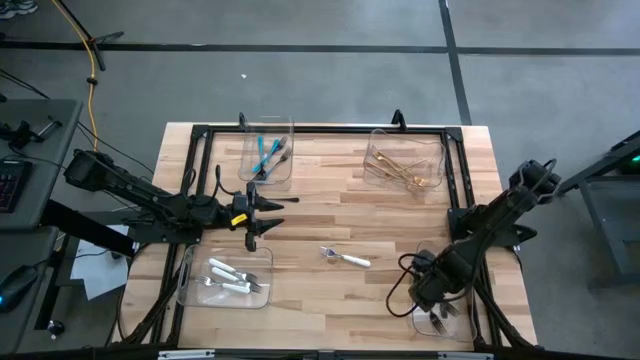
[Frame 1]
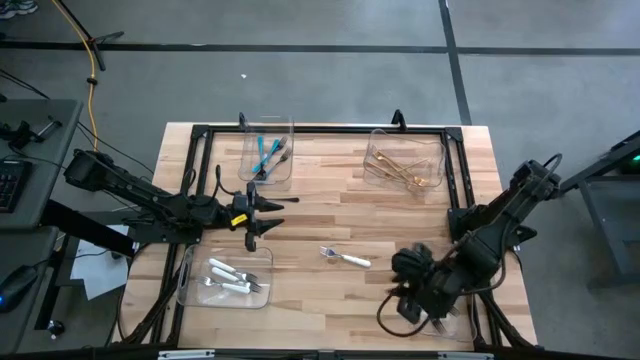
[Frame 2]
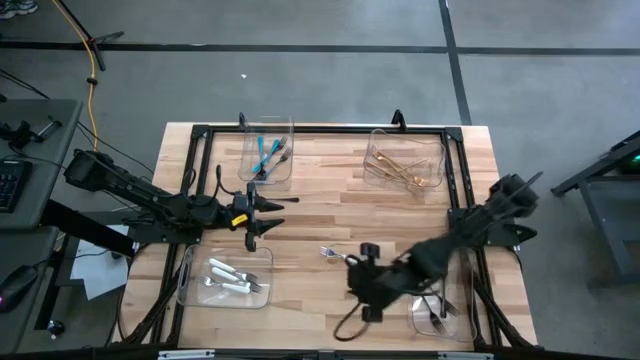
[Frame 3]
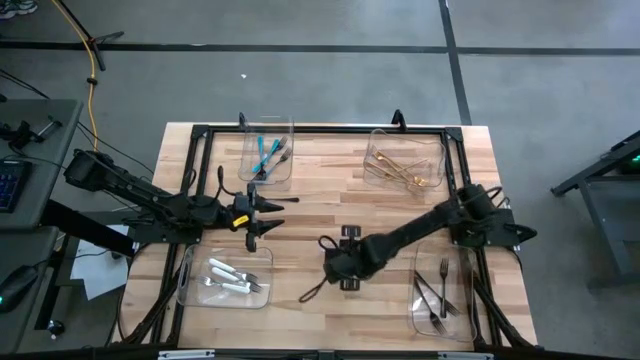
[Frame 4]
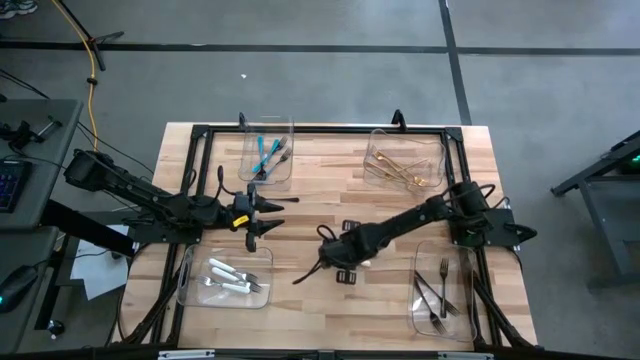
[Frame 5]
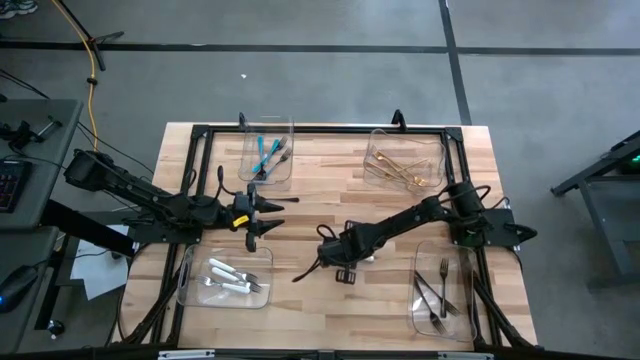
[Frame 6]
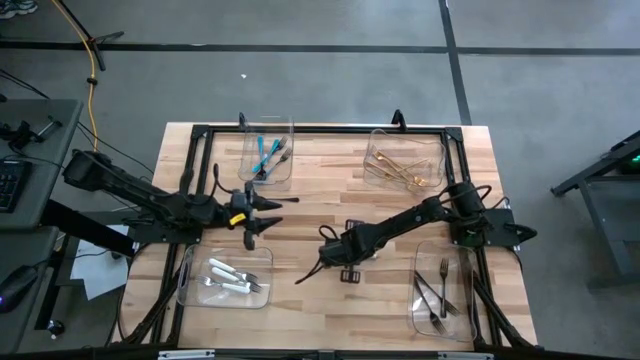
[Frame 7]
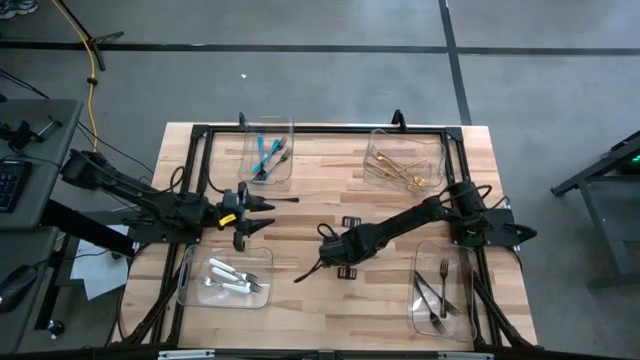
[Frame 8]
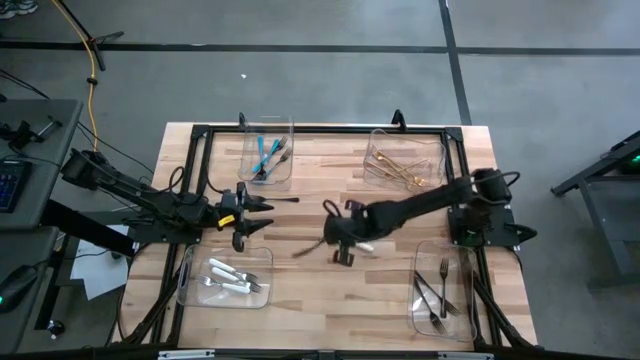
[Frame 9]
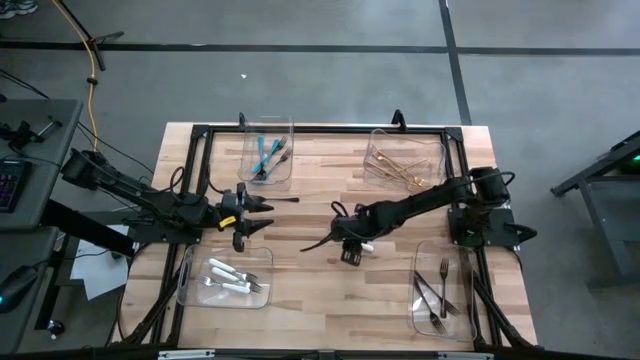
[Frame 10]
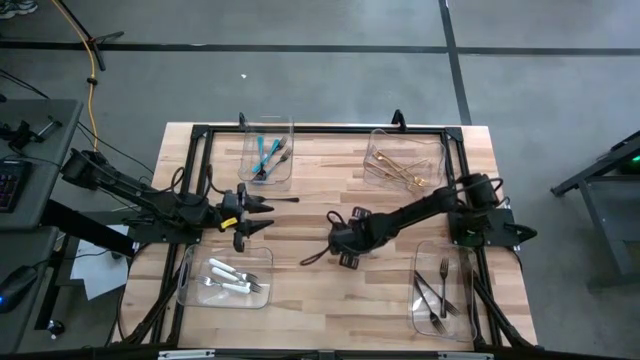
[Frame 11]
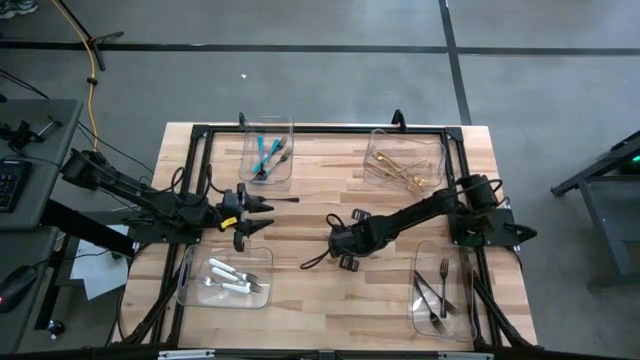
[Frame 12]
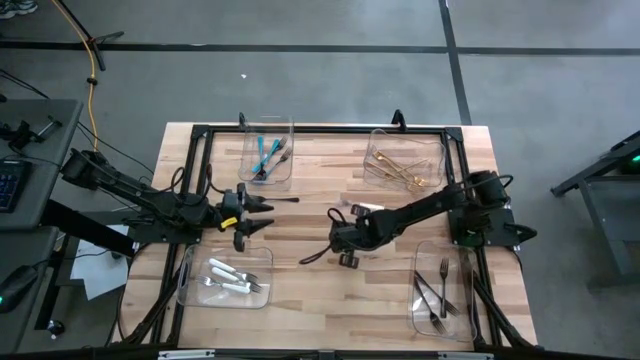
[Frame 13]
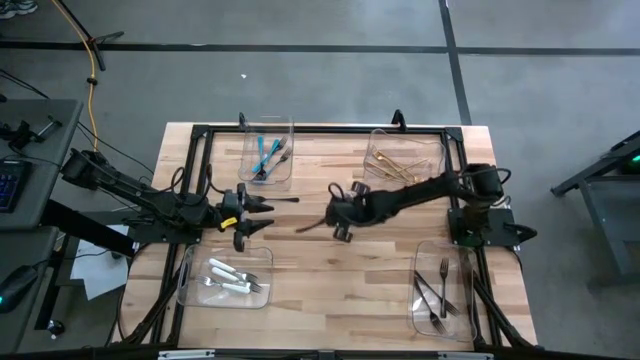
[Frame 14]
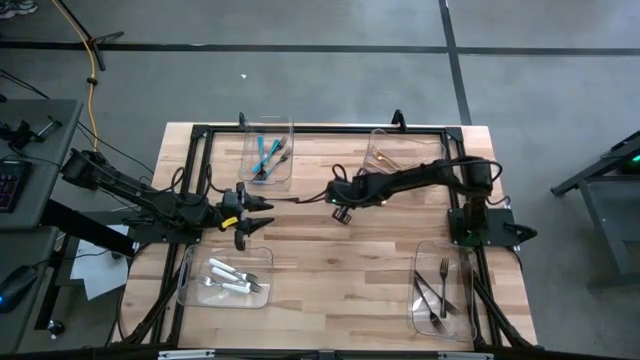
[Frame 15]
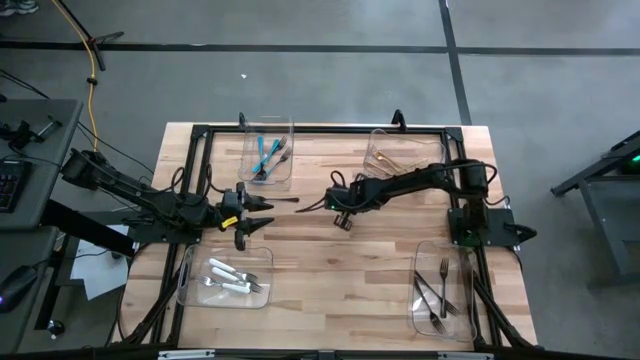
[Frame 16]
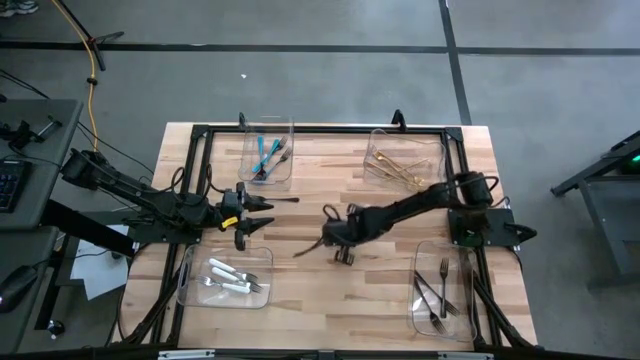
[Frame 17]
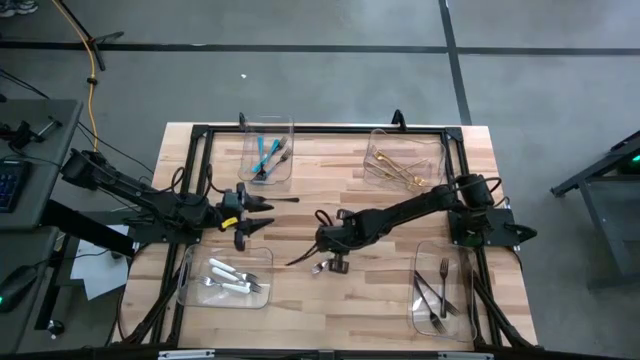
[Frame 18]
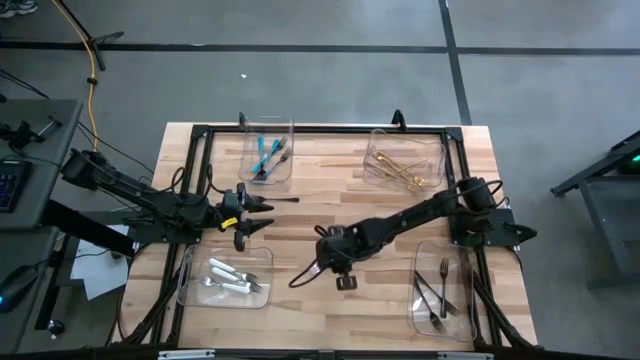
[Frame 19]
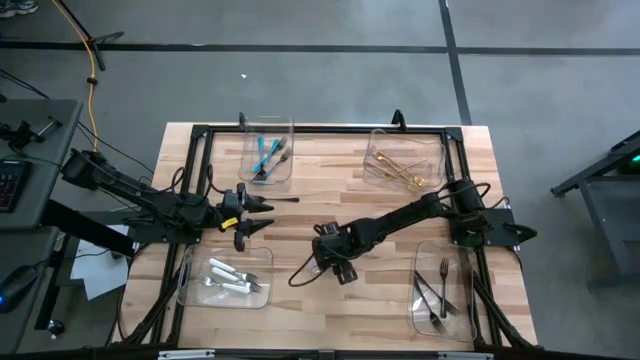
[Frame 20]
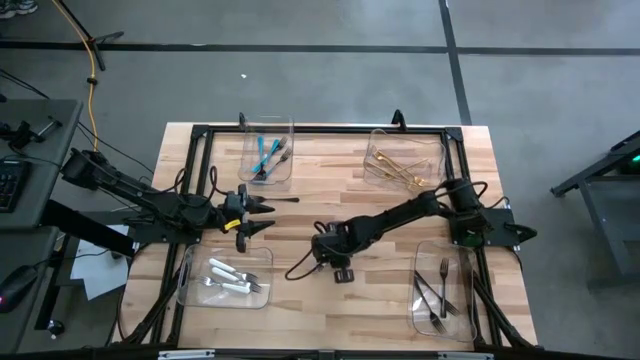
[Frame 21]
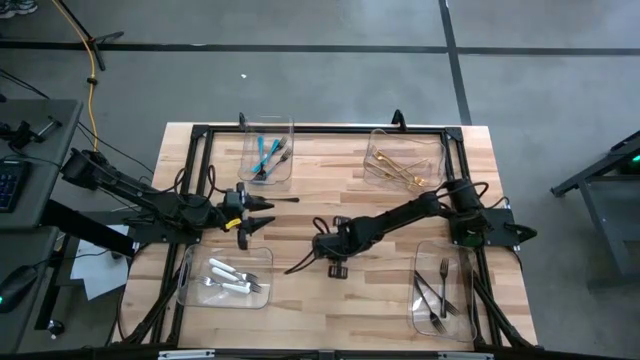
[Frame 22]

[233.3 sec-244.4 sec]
Task: Sort silverware by color (type)
Put the white fork into the bottom left transparent bin

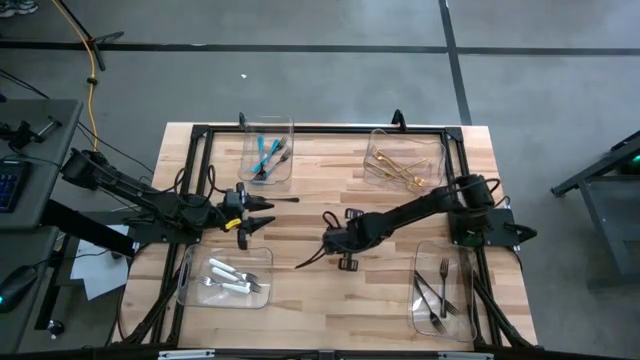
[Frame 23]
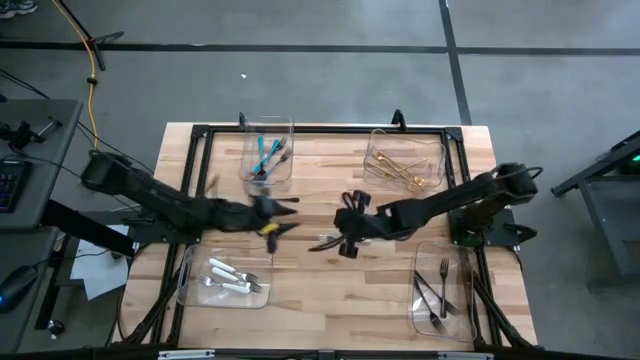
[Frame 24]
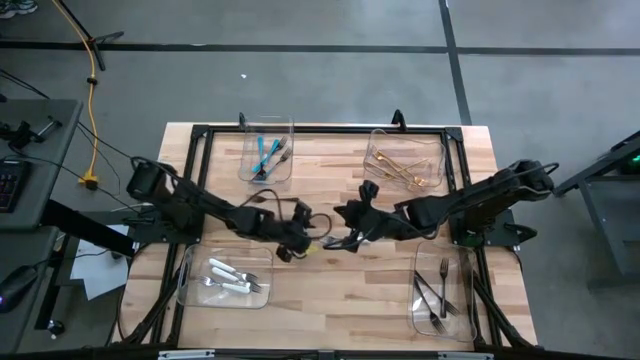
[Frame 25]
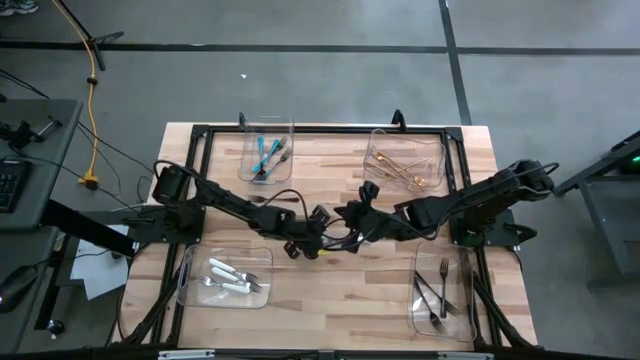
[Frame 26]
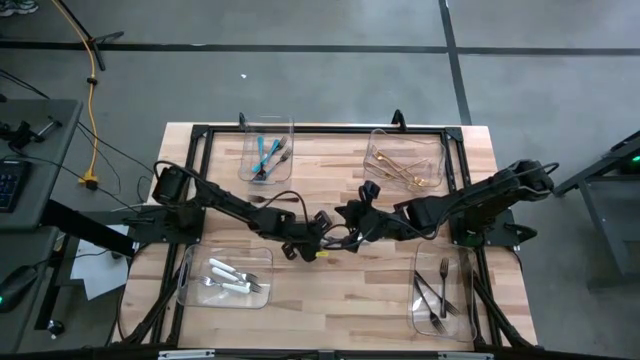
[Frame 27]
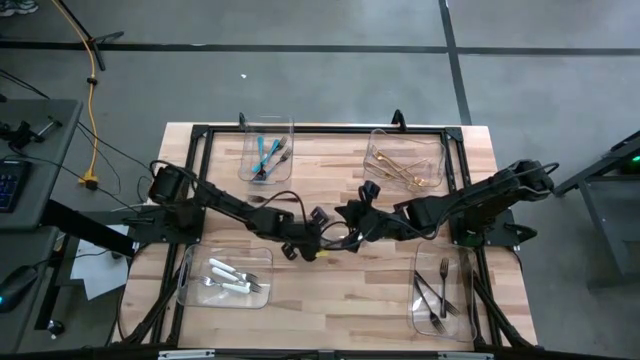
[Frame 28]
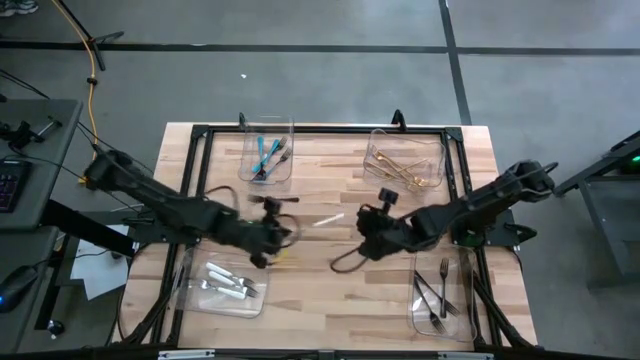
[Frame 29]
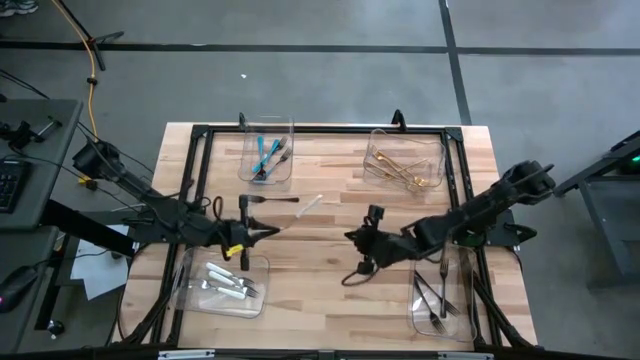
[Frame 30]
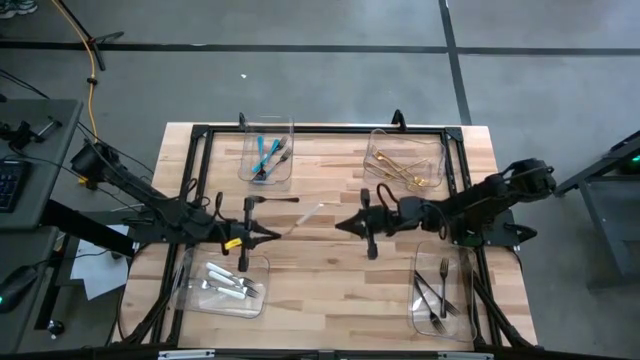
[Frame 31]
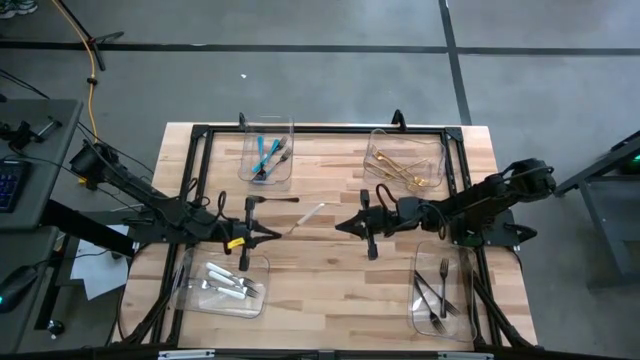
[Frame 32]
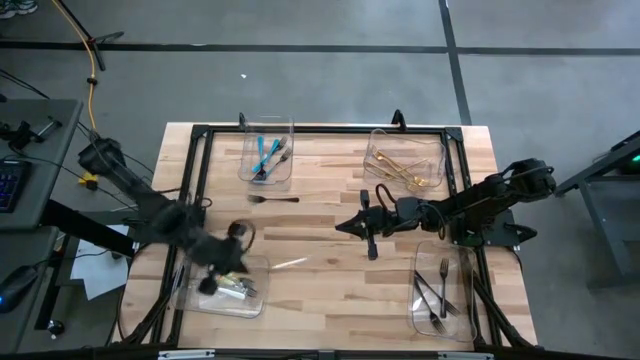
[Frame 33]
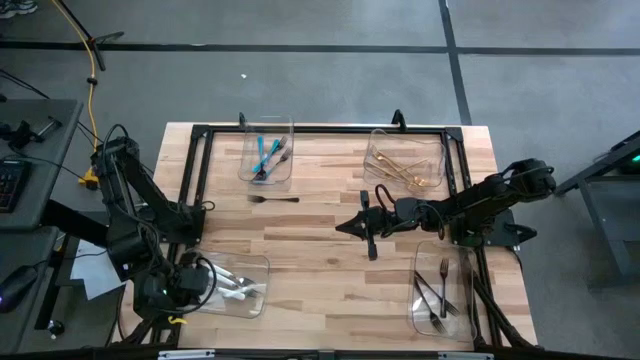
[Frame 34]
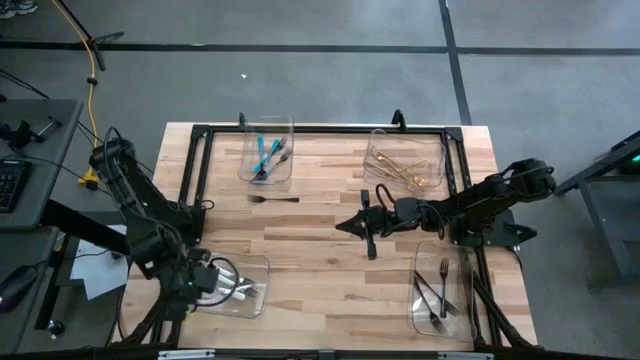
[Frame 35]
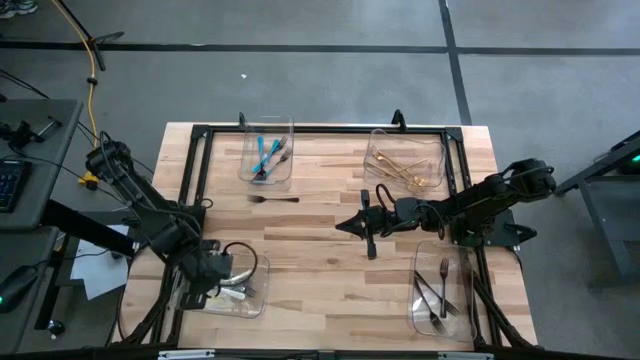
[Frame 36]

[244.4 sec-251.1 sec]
Put the white fork into the bottom left transparent bin

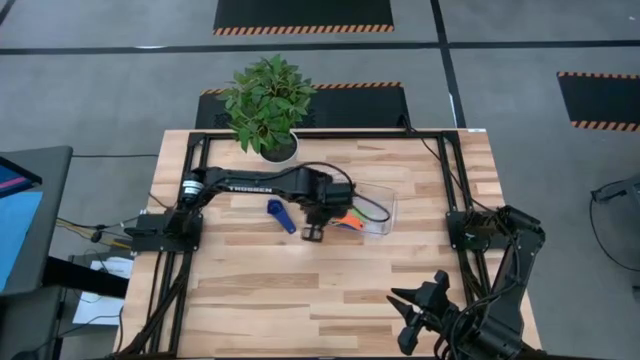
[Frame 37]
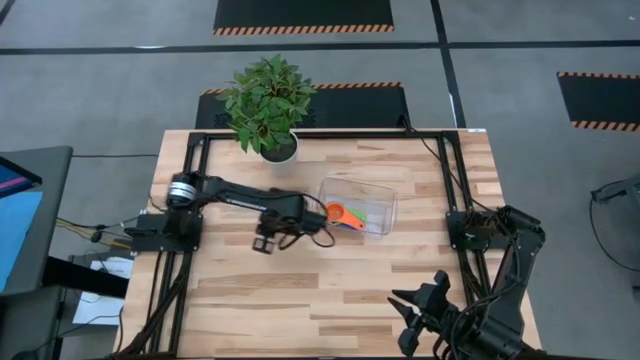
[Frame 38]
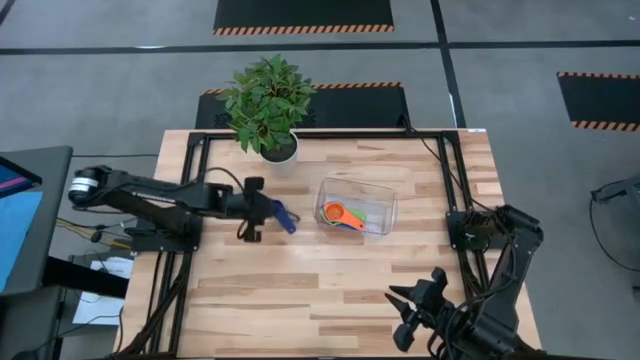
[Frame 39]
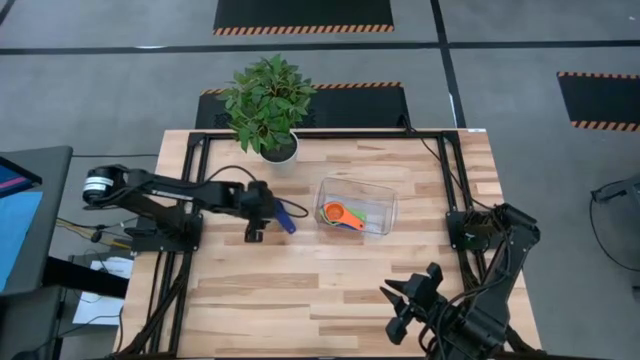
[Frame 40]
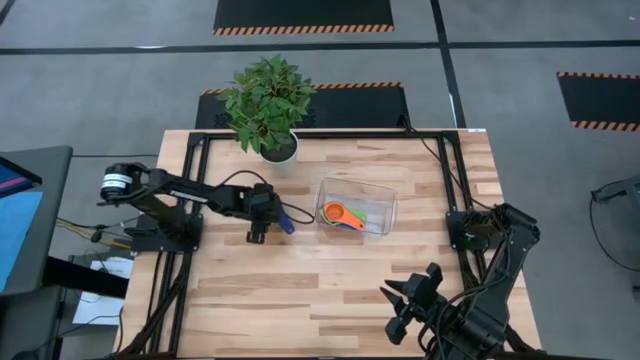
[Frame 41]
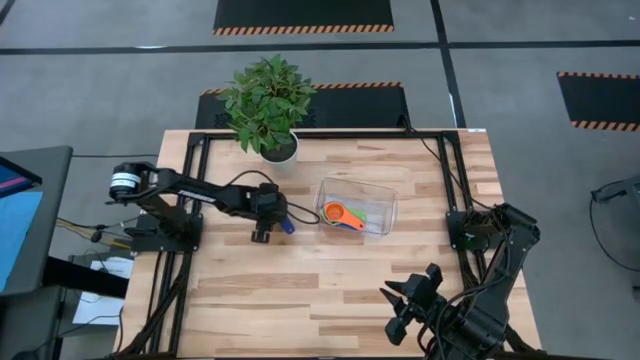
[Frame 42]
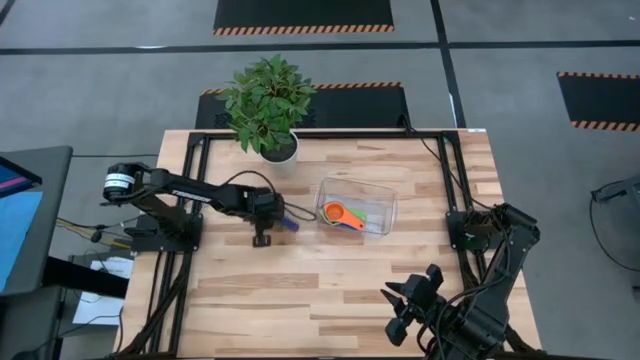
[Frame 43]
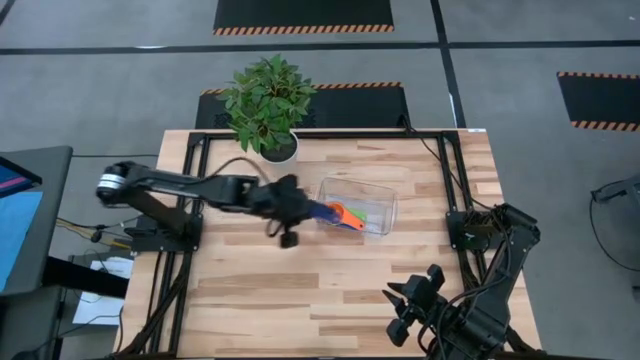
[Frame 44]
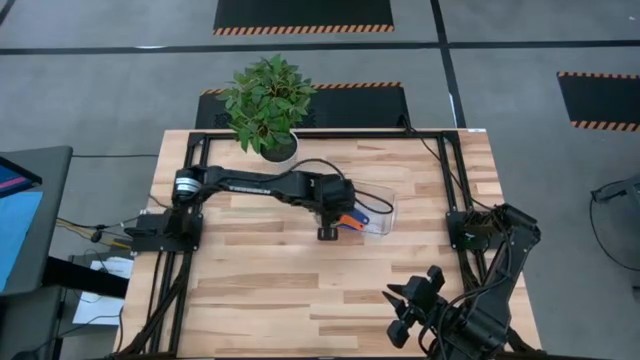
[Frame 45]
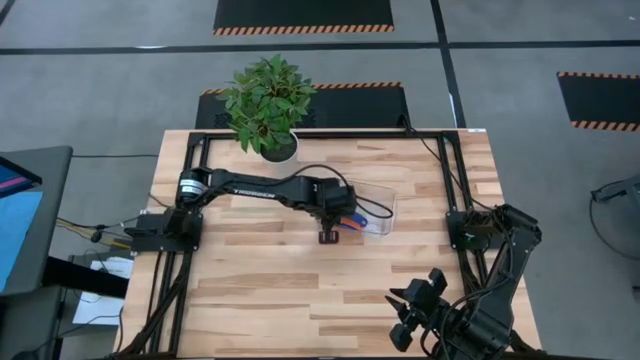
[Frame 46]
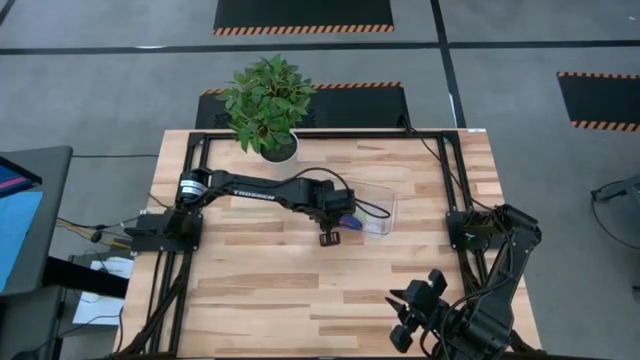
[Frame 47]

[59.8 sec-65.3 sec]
Task: Nest measuring cups in basket
Stack the purple measuring cup on top of the orange measuring cup in the transparent bin
